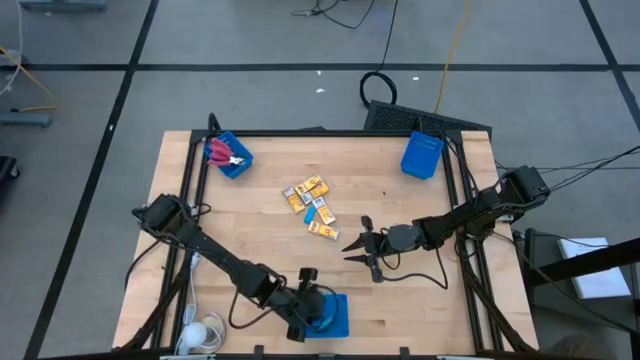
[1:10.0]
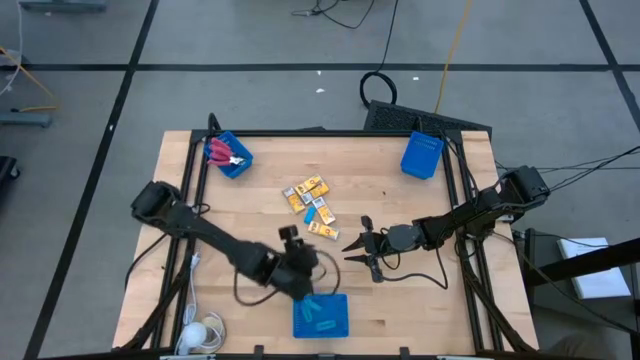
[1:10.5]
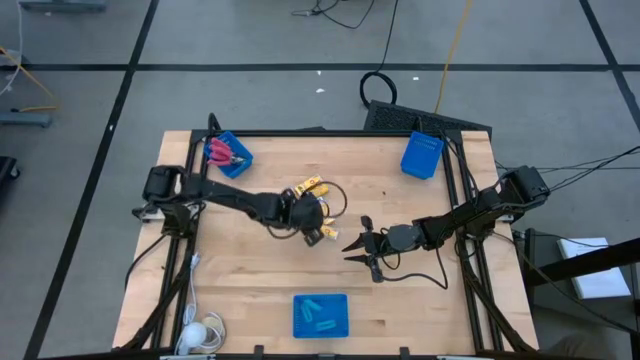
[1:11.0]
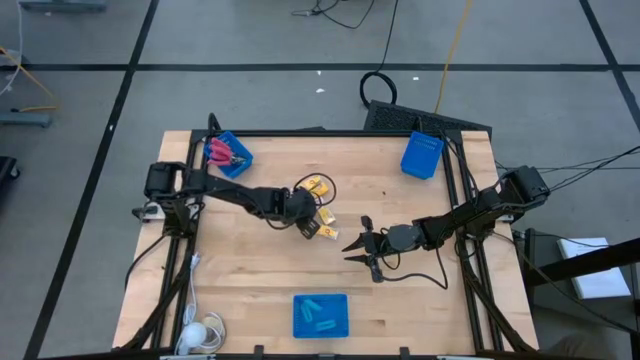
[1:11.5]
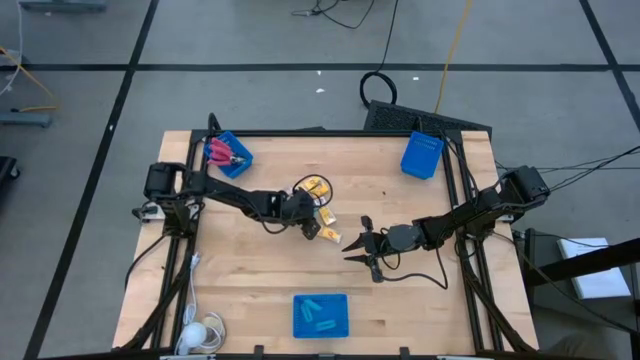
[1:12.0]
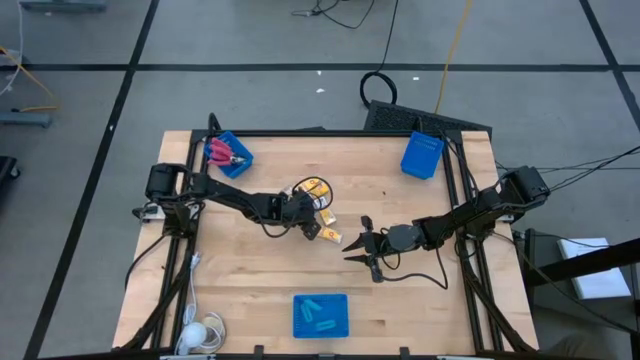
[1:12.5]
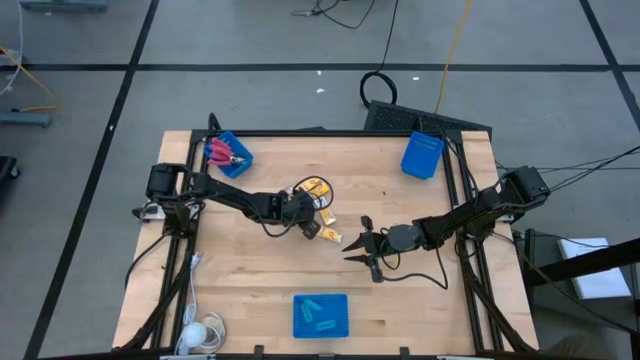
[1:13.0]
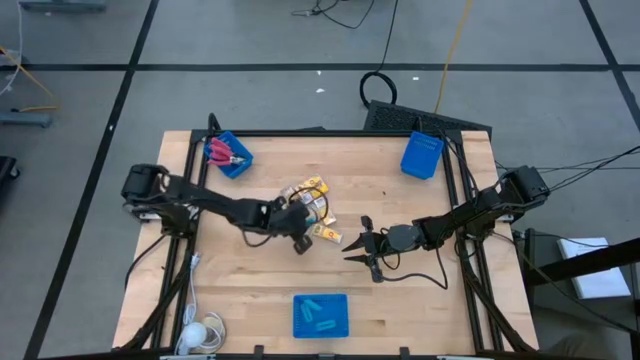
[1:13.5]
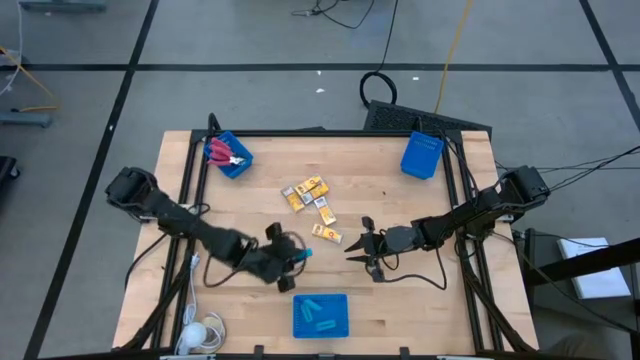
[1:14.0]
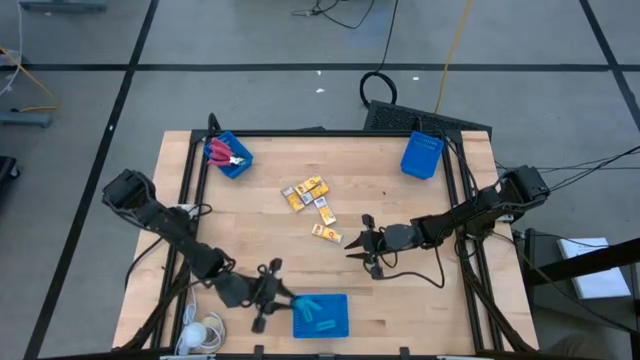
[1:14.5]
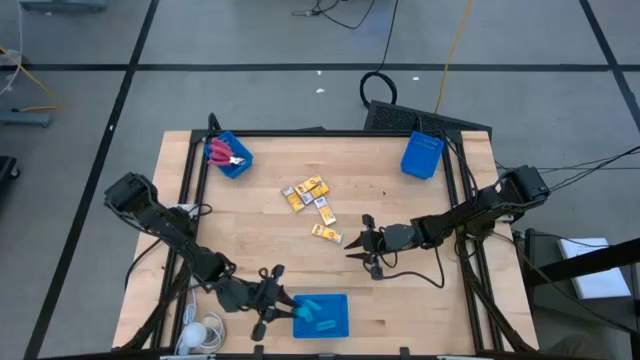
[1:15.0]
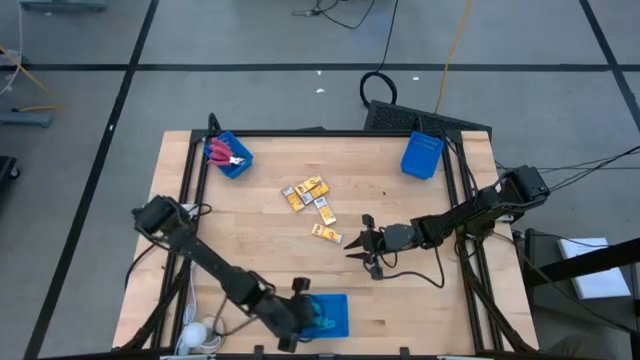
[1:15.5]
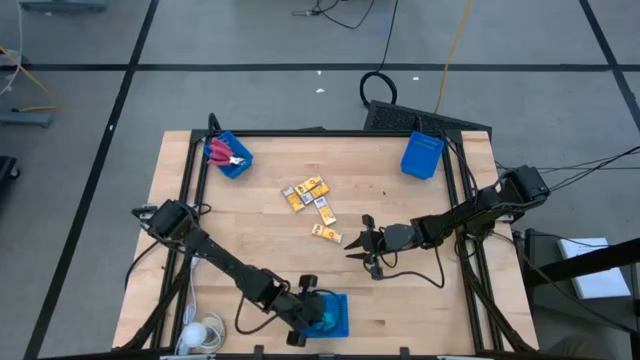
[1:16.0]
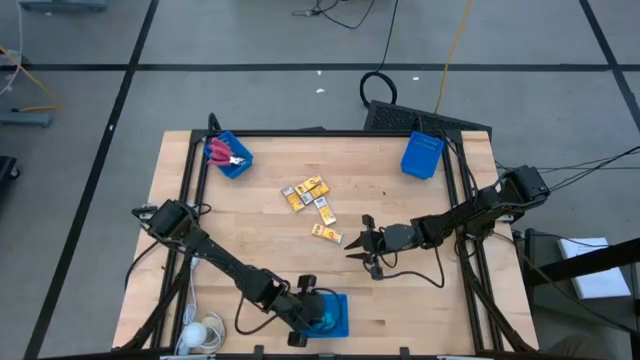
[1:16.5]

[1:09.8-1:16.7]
Task: Pick & Place School Supplies
Put the blue eraser into the bottom blue bin

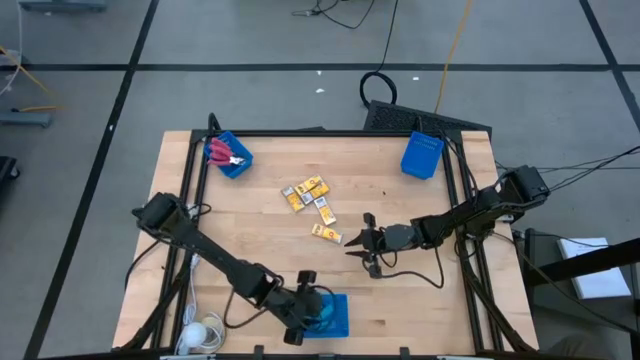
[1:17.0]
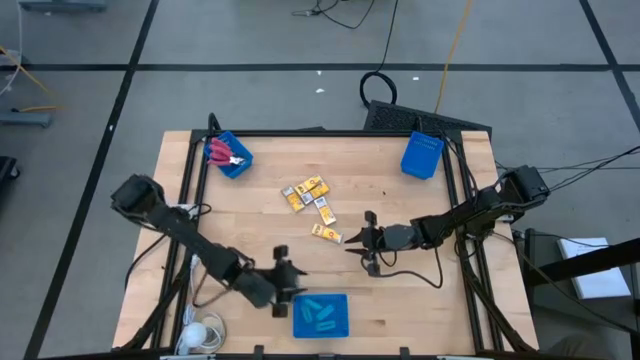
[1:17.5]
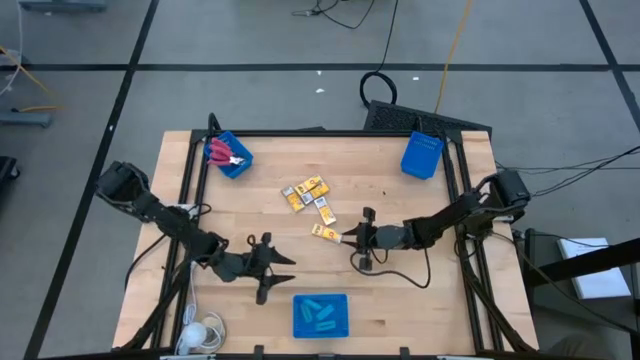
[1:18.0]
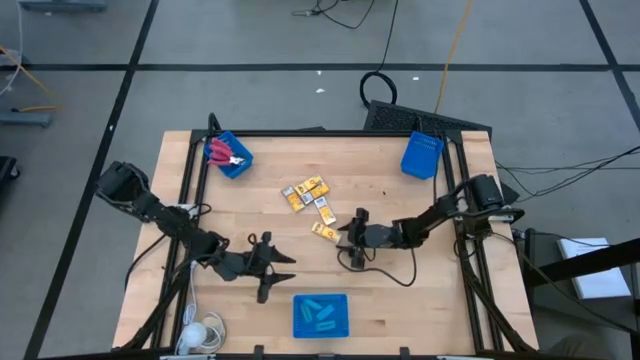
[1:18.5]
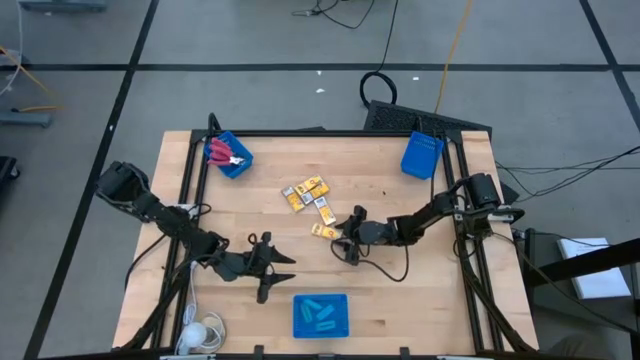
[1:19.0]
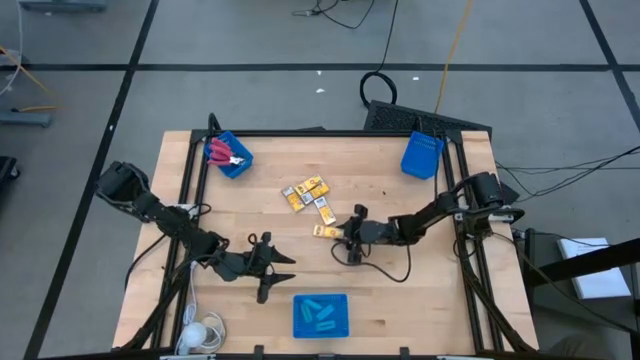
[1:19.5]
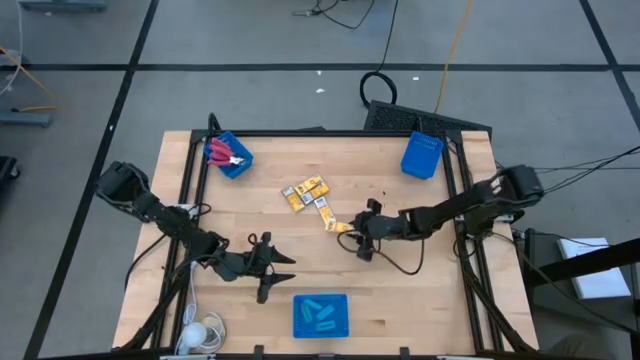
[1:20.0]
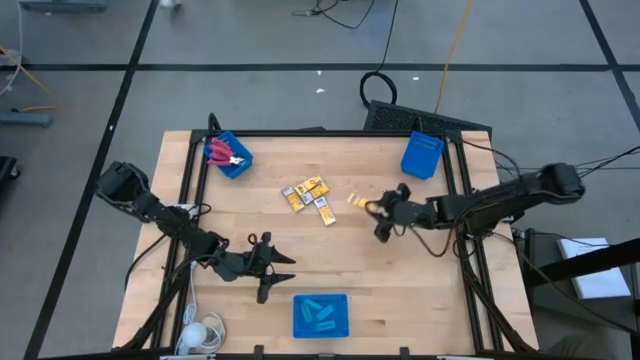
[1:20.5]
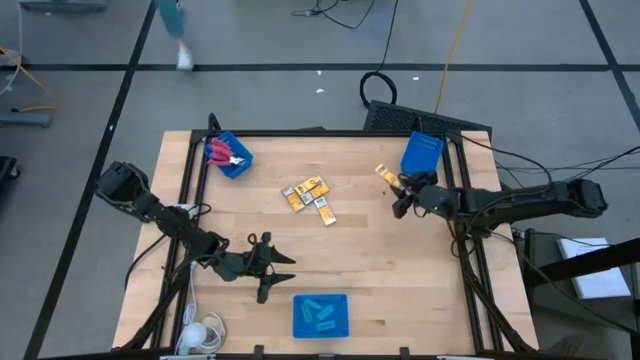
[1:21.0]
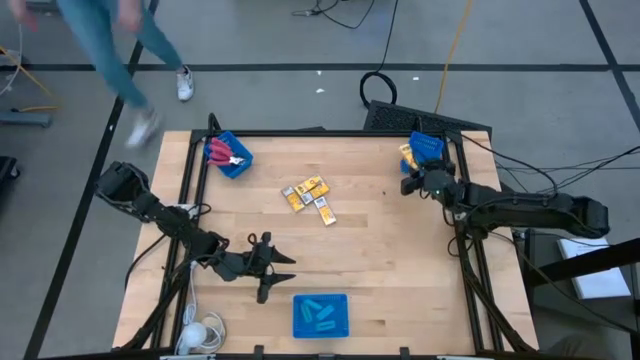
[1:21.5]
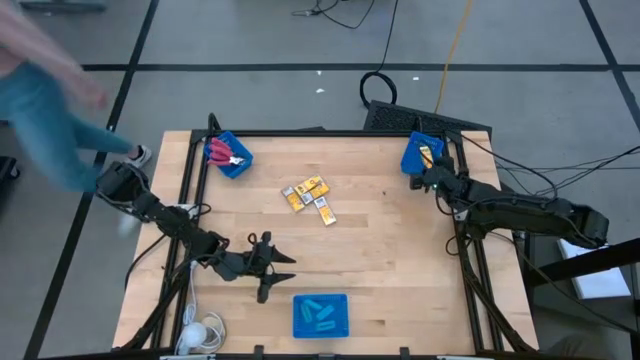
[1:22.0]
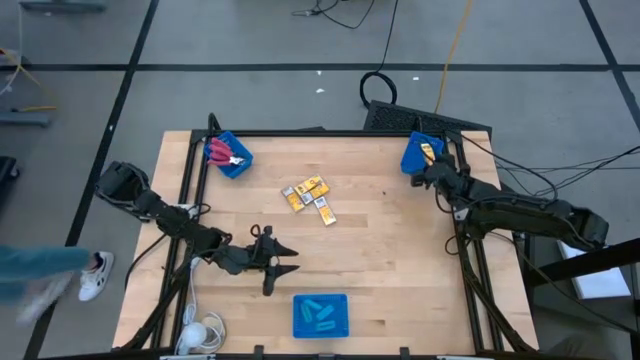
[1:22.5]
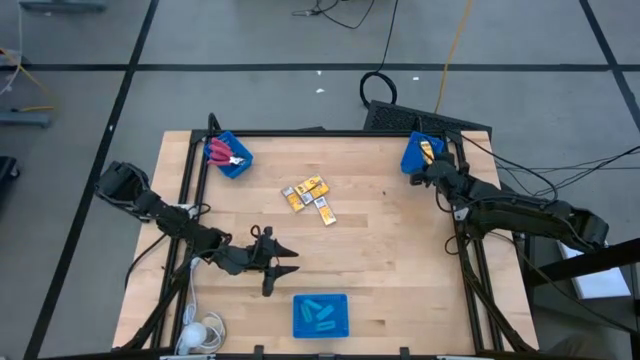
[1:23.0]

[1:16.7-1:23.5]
Put the crayon box into the right blue bin

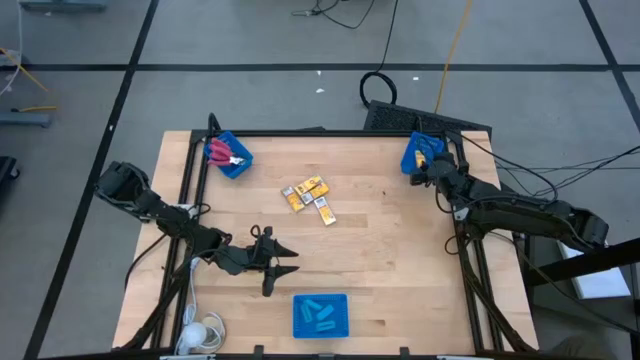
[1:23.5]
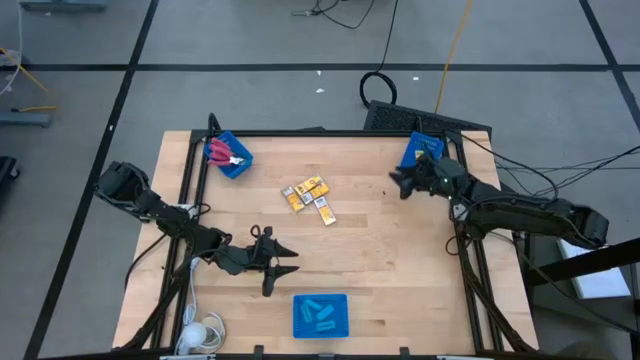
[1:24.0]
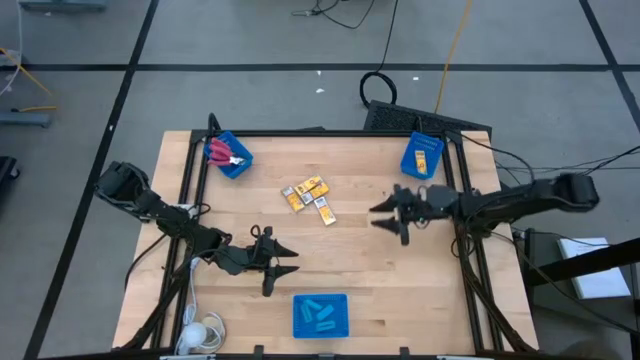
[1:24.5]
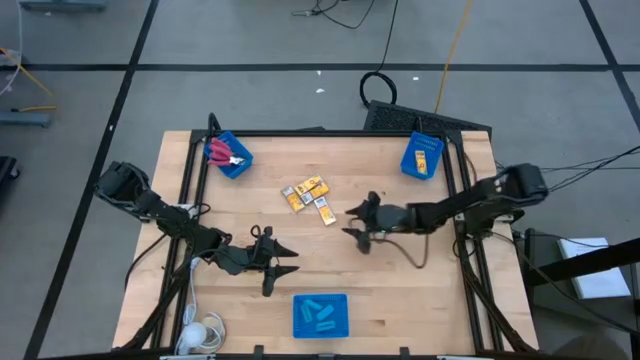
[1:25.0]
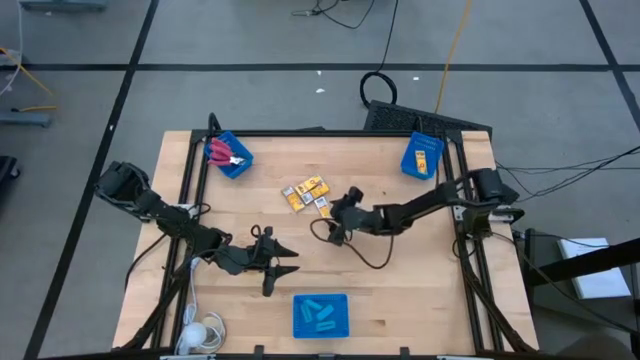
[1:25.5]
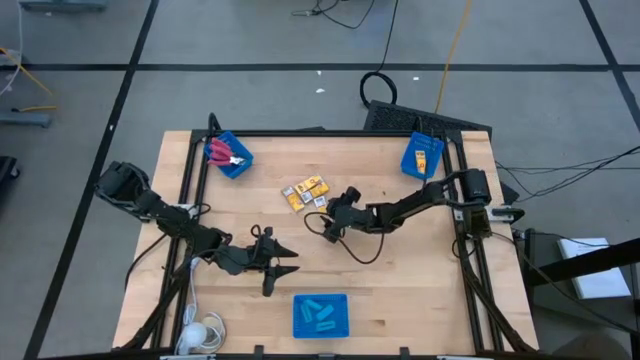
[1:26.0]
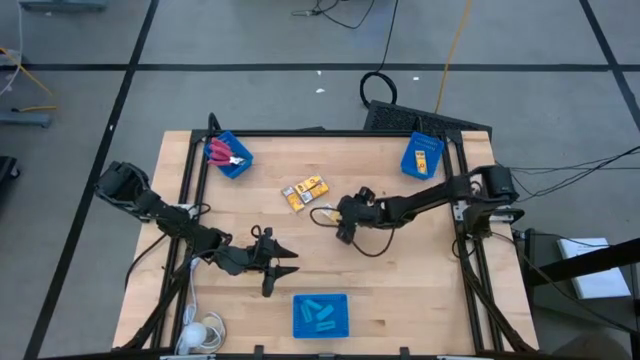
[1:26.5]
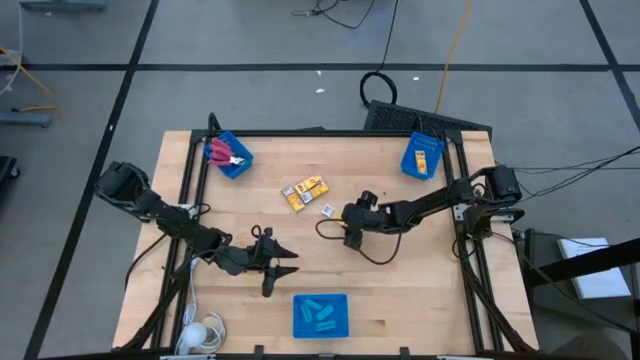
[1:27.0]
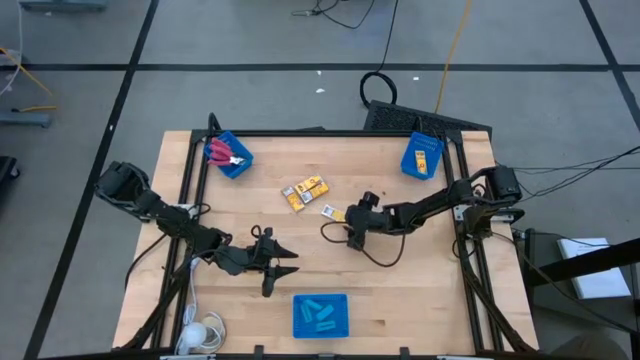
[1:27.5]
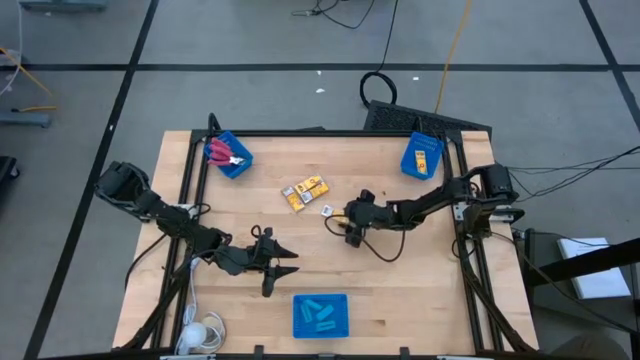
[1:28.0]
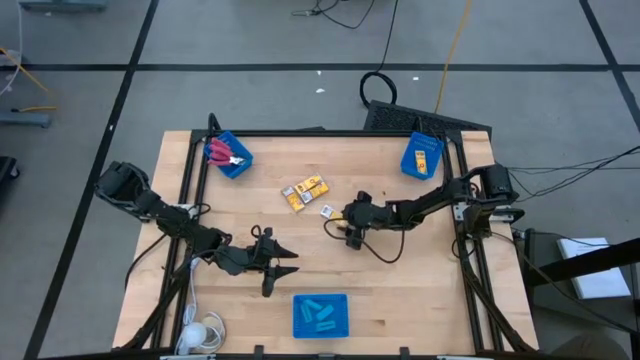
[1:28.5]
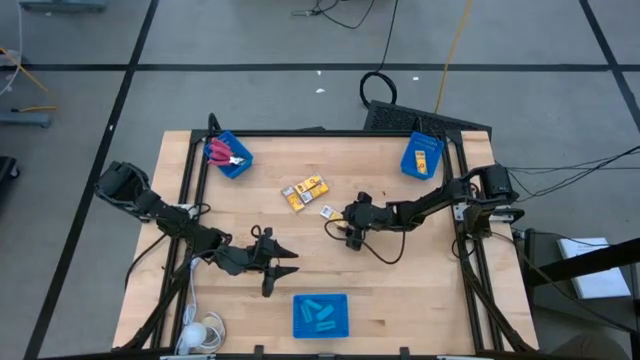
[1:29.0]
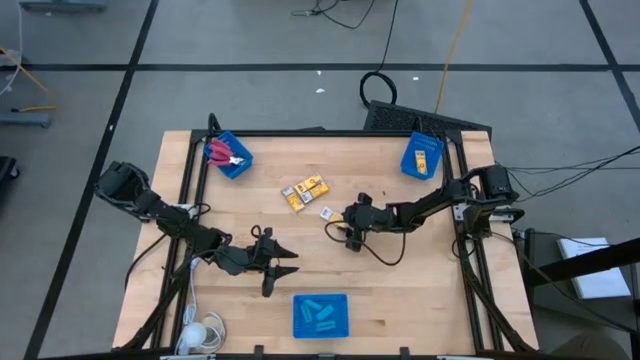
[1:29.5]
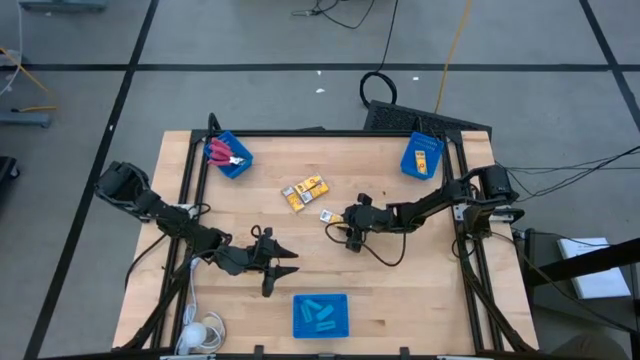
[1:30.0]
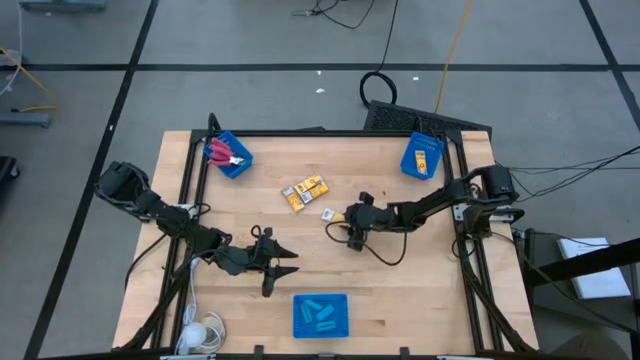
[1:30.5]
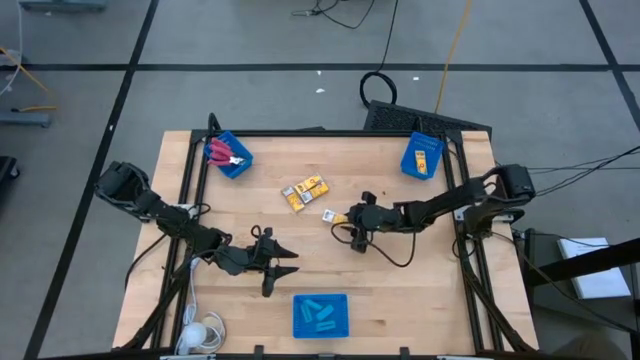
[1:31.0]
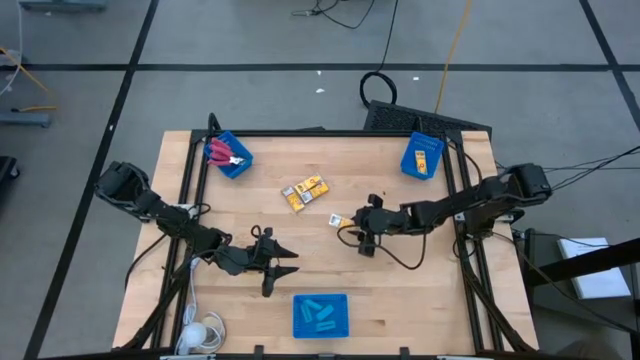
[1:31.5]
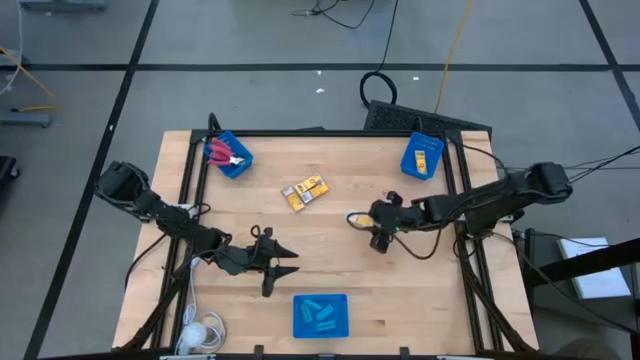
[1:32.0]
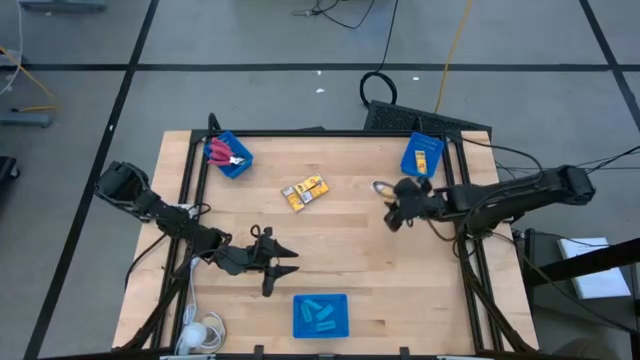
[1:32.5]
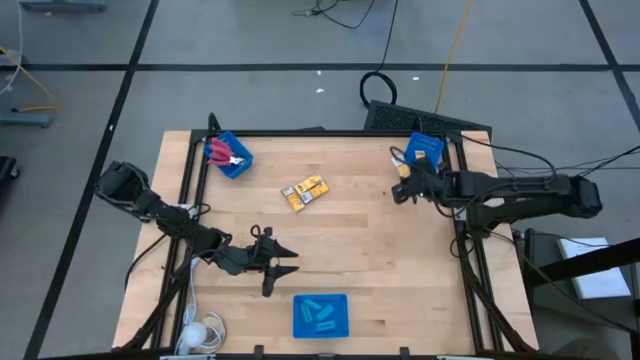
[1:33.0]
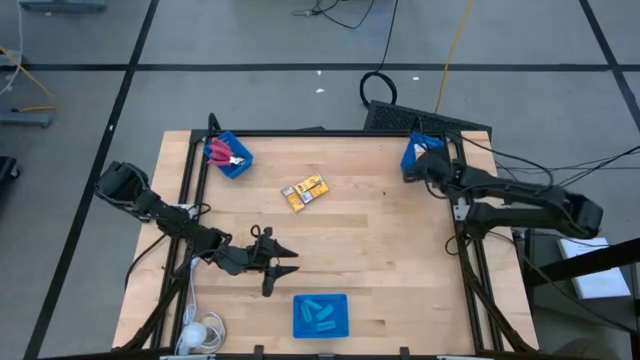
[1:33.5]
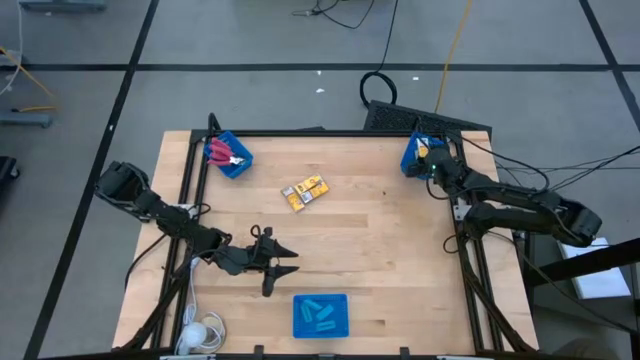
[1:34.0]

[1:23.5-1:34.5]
Put the crayon box into the right blue bin
